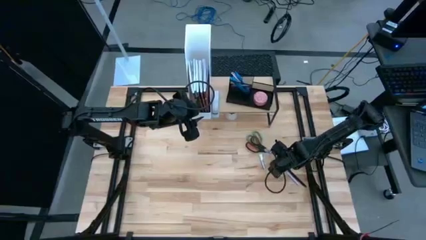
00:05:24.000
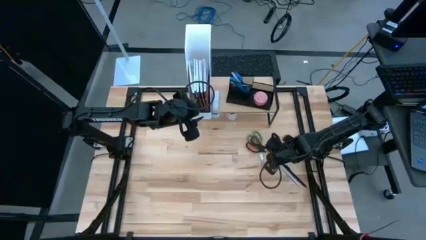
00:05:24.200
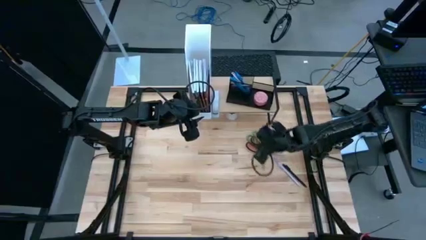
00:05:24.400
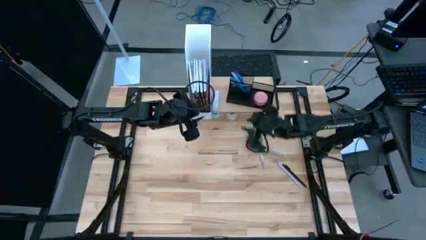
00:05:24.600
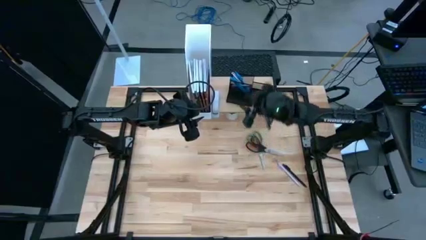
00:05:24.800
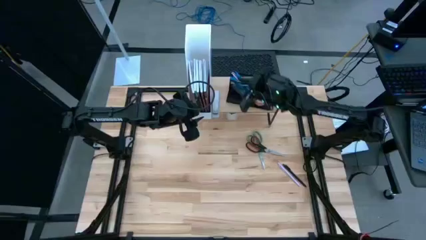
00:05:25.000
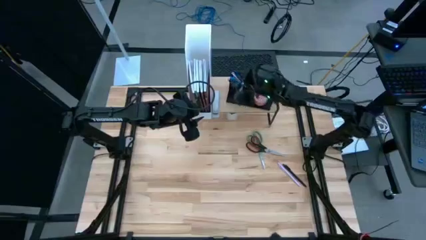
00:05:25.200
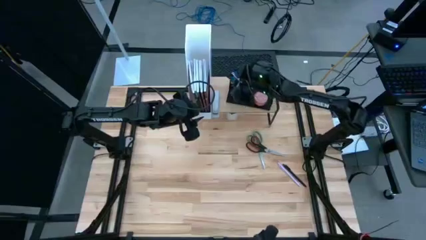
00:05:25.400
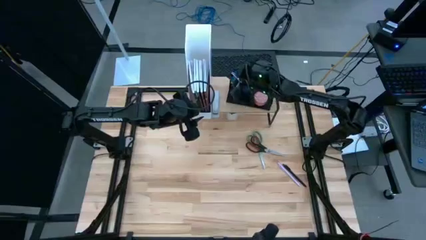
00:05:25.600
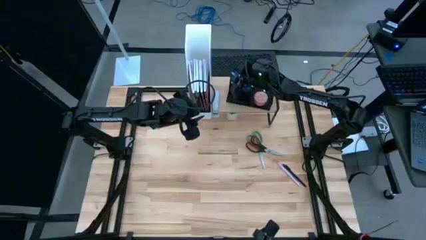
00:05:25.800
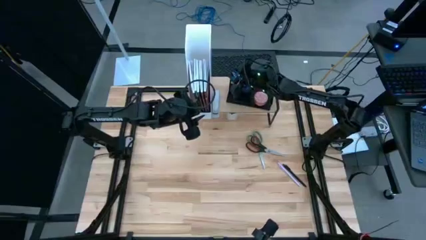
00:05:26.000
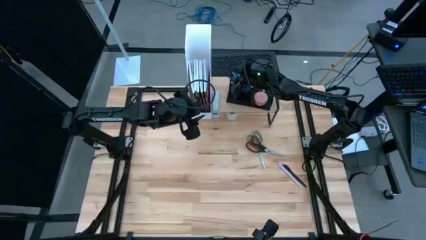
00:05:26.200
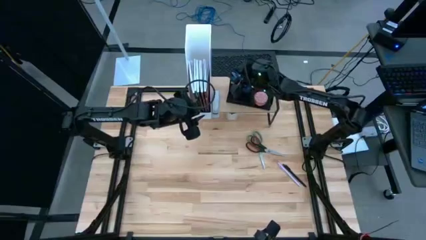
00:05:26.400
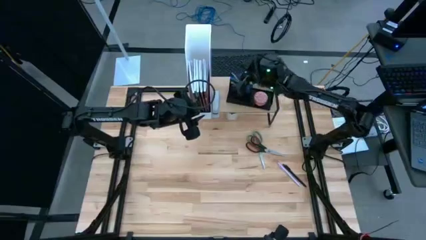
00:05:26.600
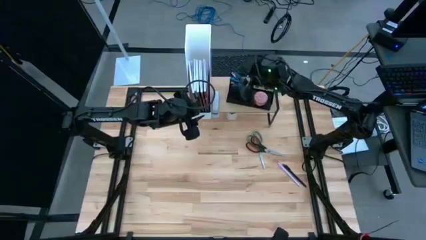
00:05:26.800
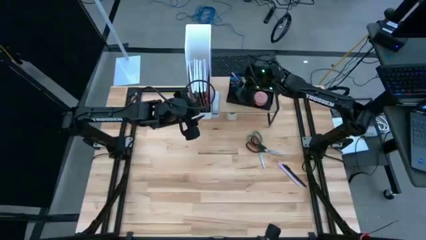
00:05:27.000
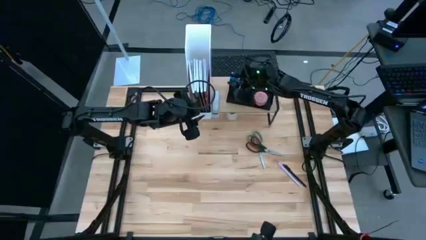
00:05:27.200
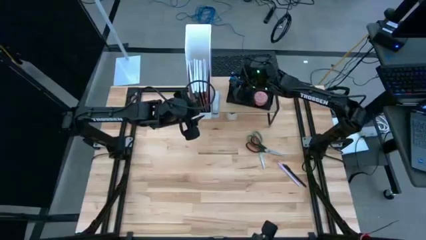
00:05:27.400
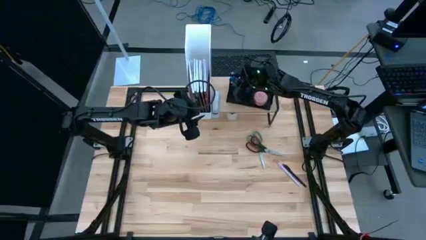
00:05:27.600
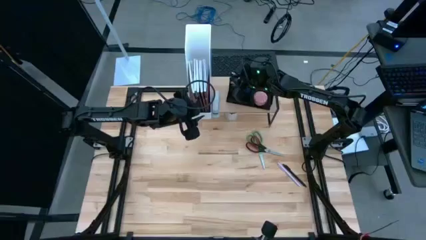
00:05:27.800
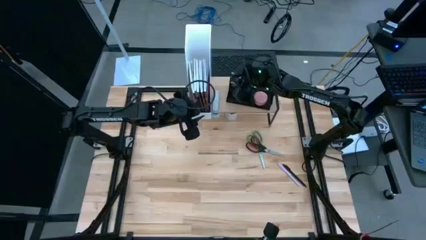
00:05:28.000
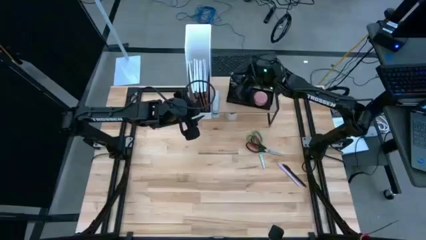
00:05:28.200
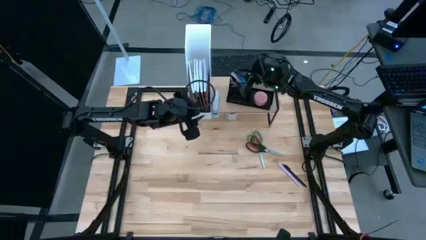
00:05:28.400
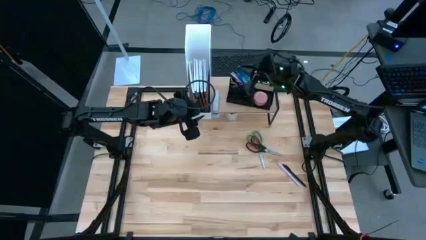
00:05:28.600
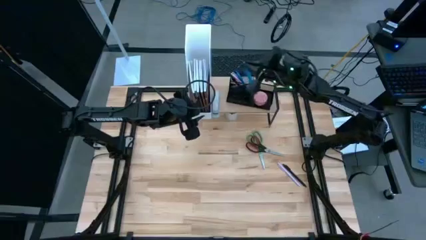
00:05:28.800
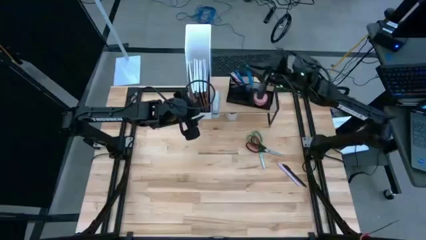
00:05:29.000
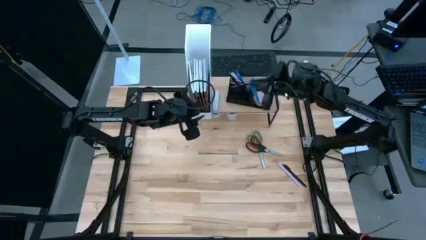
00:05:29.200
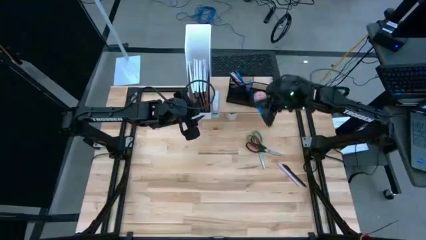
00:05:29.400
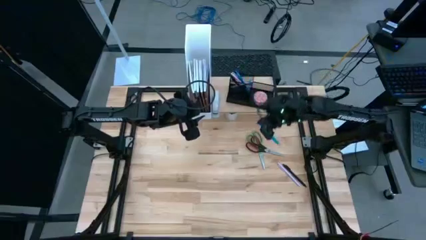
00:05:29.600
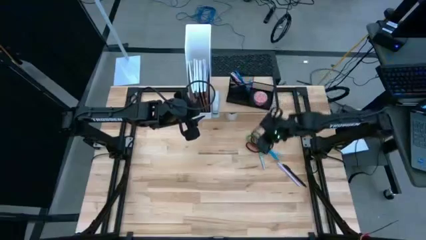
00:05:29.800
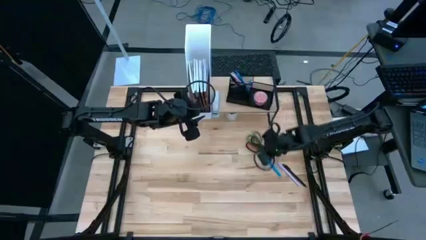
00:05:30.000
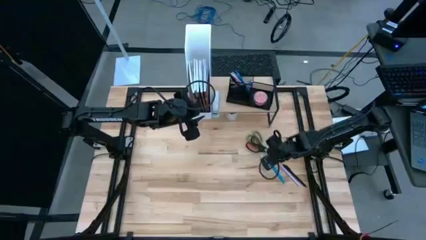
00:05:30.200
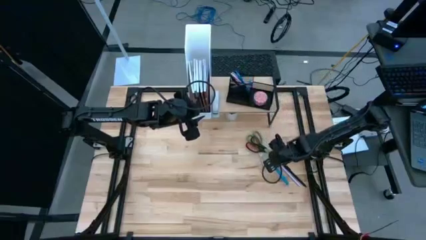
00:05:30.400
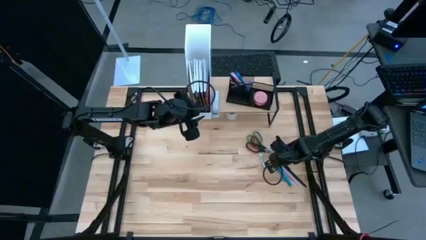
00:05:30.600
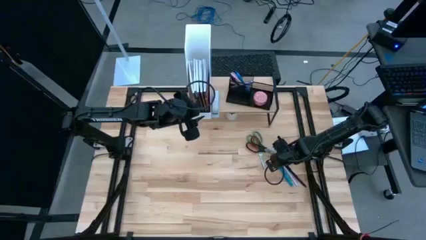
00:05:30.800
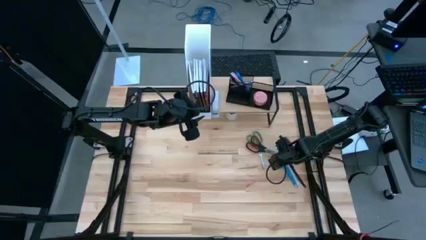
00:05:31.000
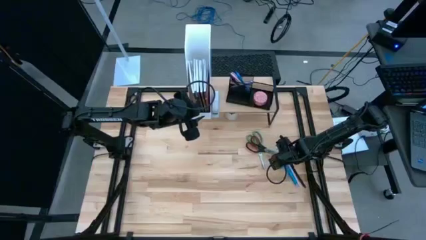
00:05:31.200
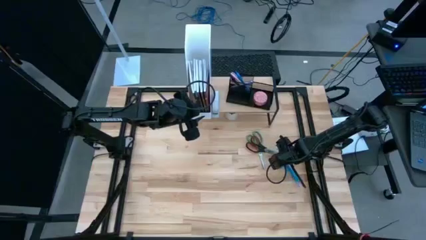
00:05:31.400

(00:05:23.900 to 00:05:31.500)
Task: Stock shelves
Remove the blue pen from the desk organizer on the shelf

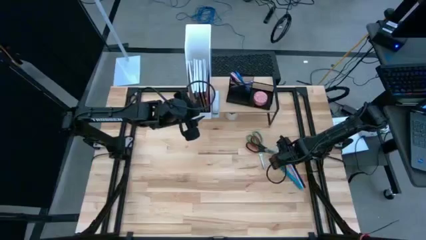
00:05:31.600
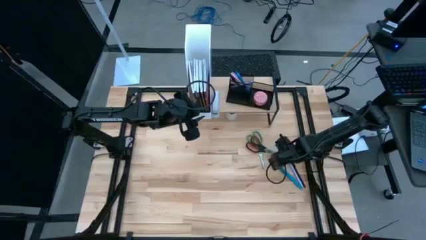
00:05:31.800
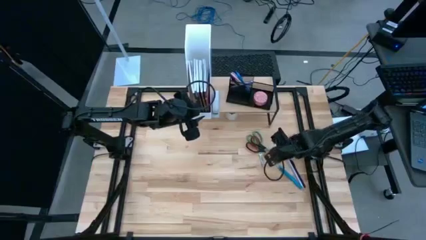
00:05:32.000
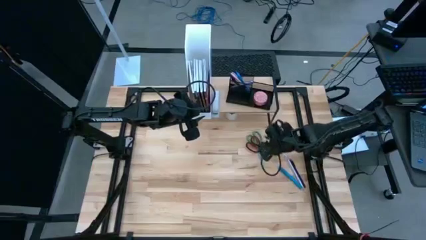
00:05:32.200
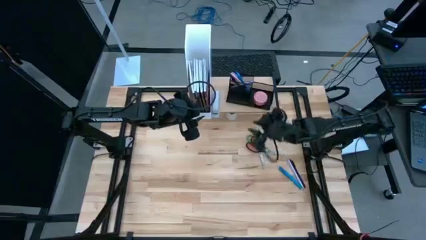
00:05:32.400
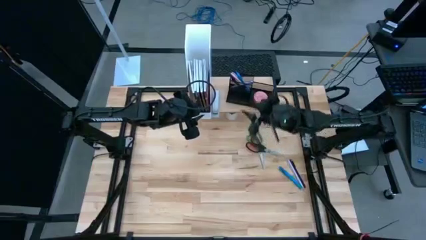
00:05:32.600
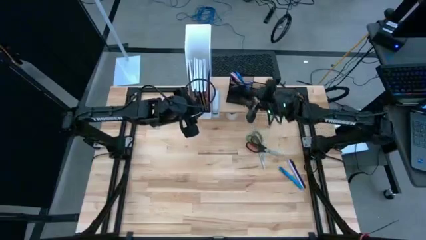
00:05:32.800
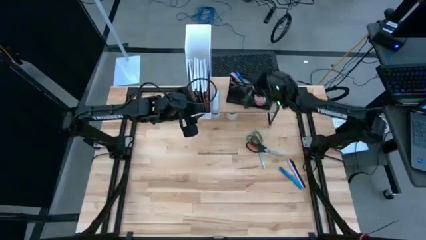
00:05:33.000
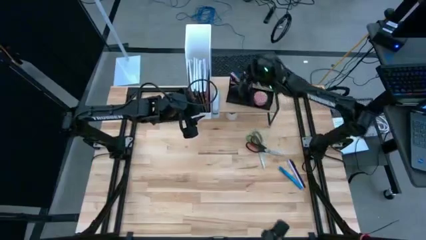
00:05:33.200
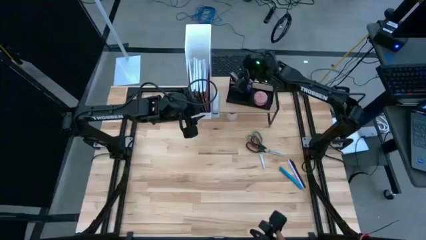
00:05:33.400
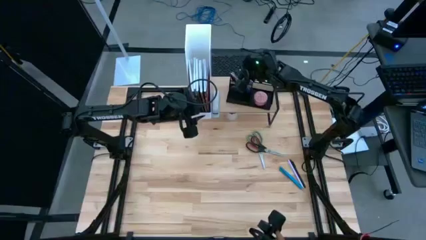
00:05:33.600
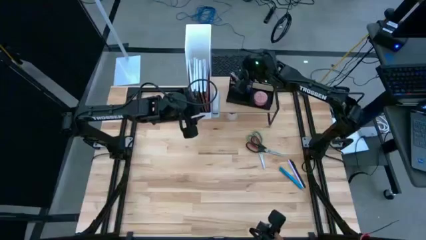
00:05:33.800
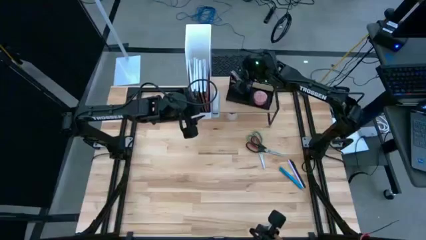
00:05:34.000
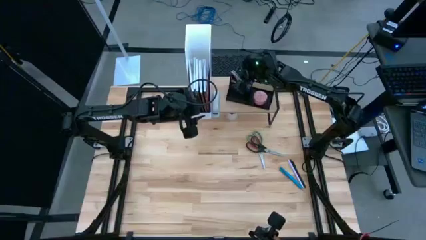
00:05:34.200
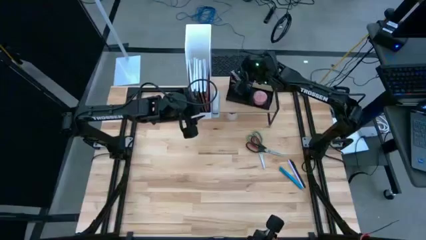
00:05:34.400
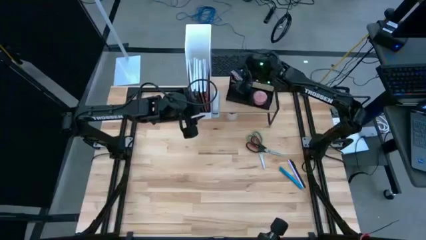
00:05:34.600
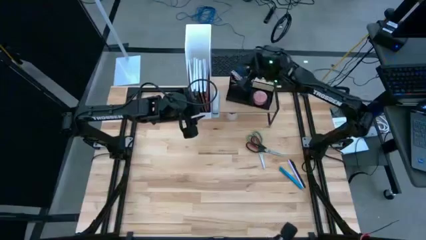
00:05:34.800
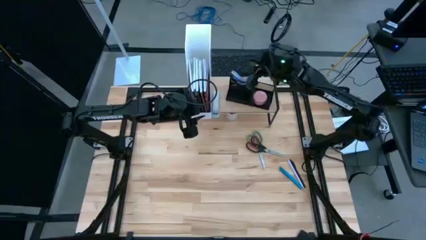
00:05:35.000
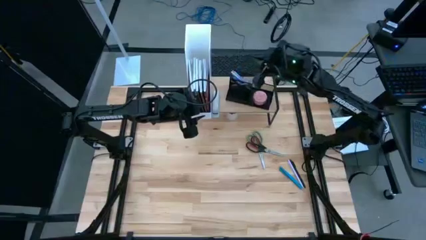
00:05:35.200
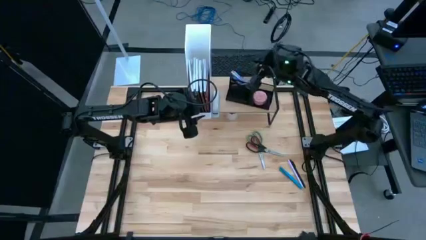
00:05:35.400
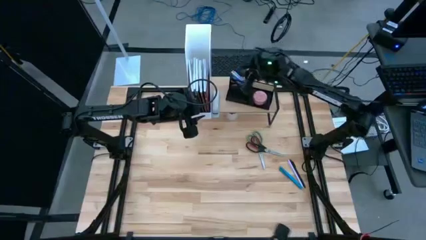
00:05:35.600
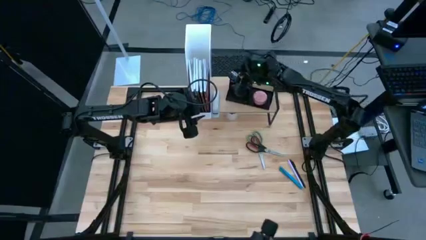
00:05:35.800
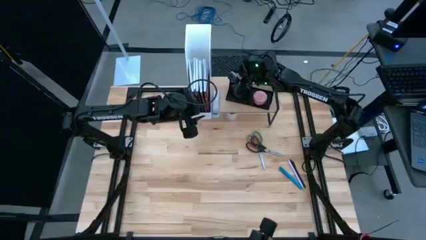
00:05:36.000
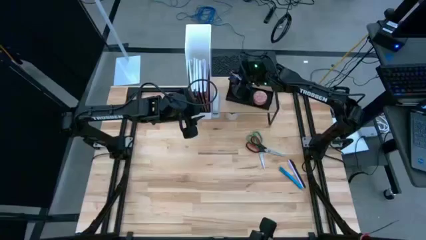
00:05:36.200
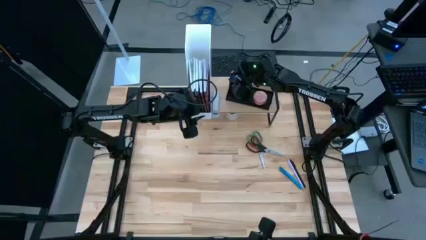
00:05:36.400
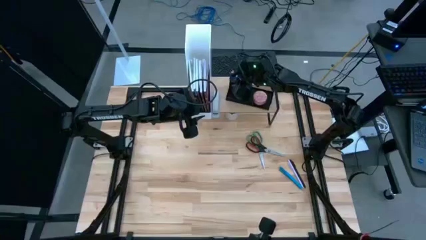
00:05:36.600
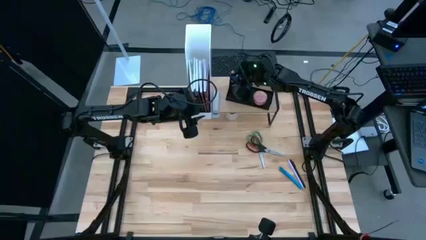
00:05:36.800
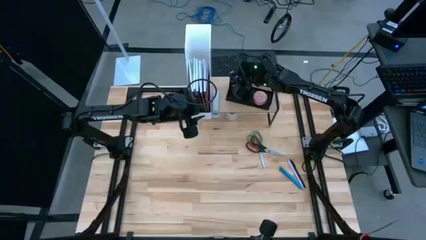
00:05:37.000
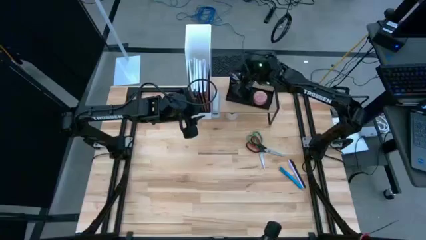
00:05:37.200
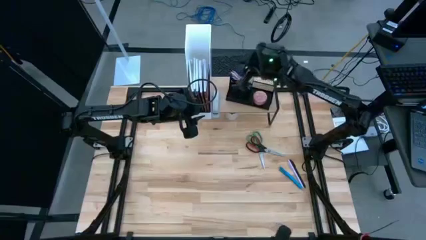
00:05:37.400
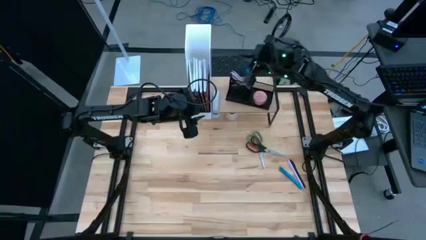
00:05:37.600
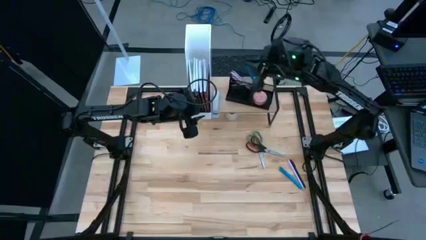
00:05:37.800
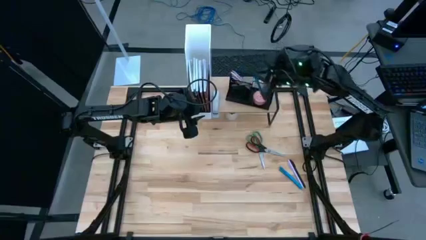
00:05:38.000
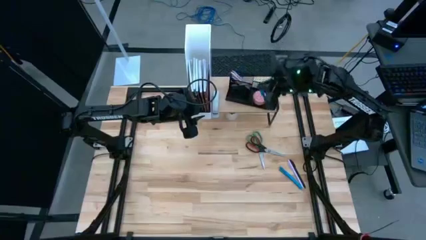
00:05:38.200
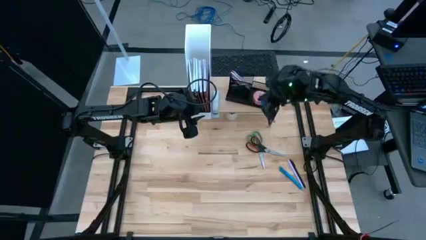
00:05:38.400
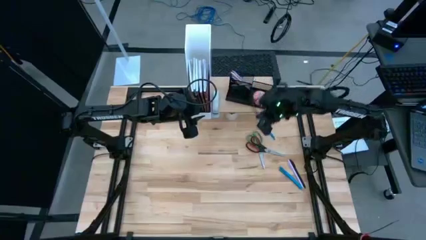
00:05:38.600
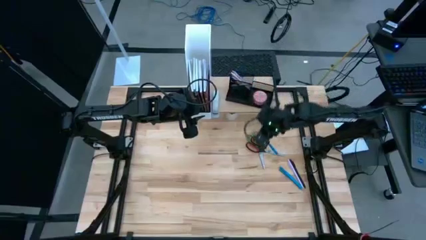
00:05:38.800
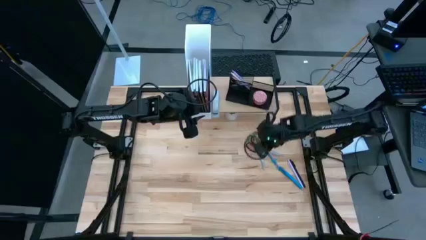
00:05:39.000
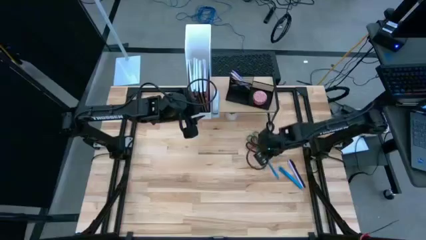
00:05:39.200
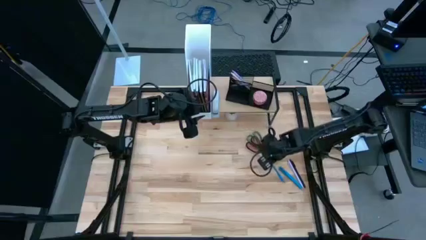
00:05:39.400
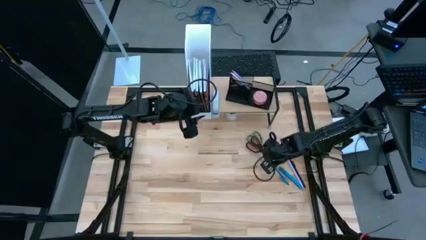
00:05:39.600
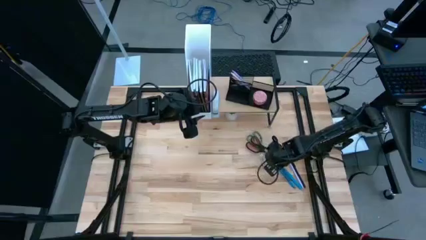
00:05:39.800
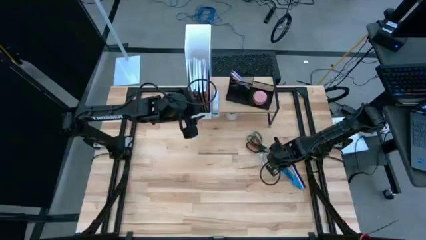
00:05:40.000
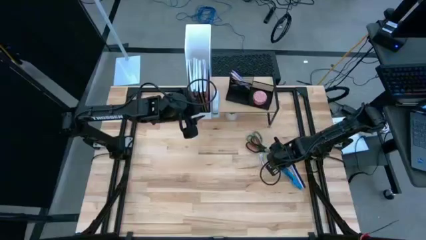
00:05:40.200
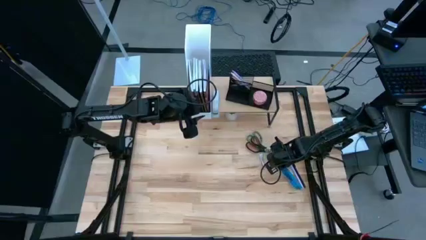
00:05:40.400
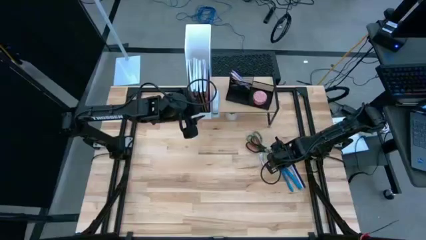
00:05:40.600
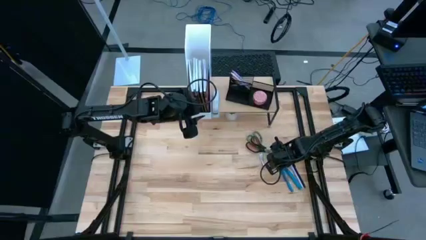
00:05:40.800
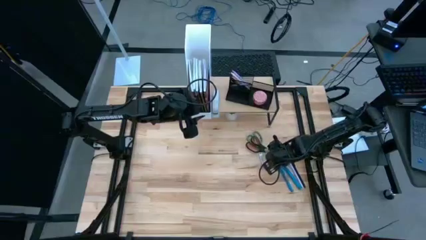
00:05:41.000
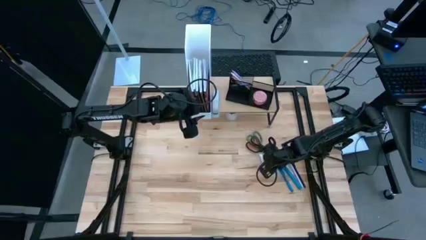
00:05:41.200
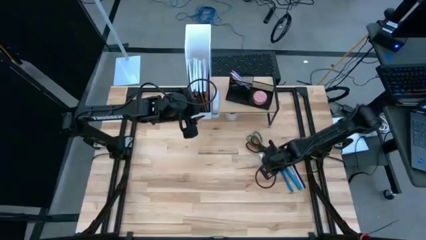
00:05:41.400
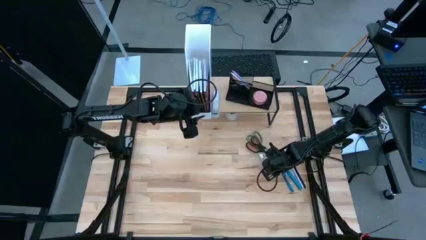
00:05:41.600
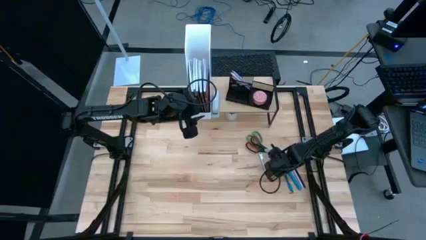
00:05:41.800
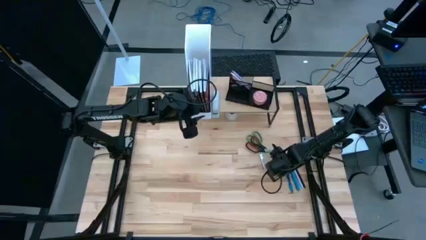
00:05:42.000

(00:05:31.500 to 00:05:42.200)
Remove the blue pen from the desk organizer on the shelf
